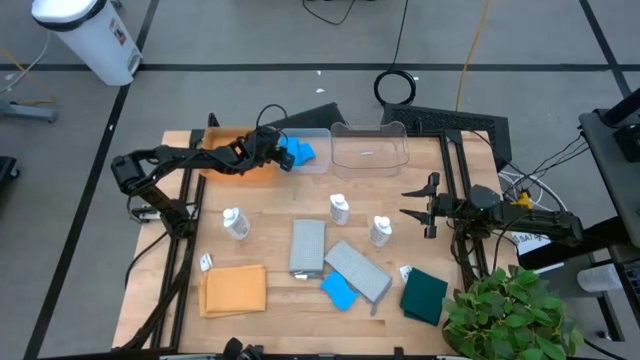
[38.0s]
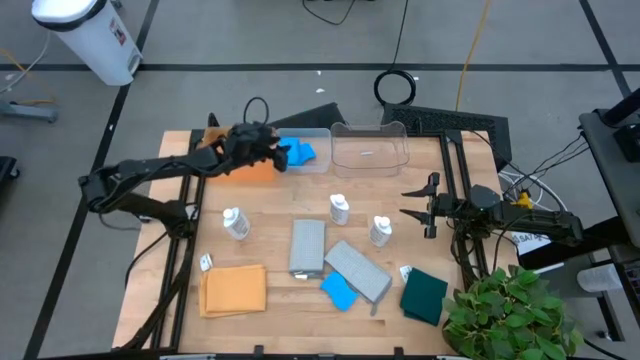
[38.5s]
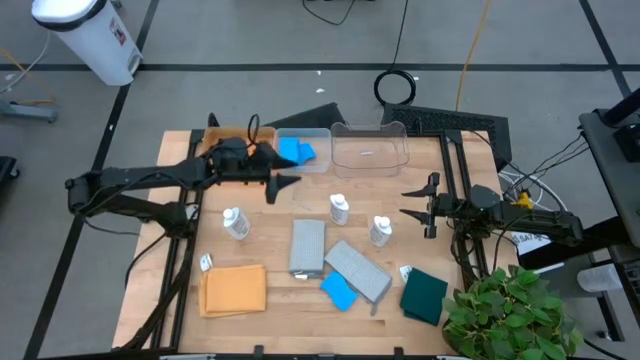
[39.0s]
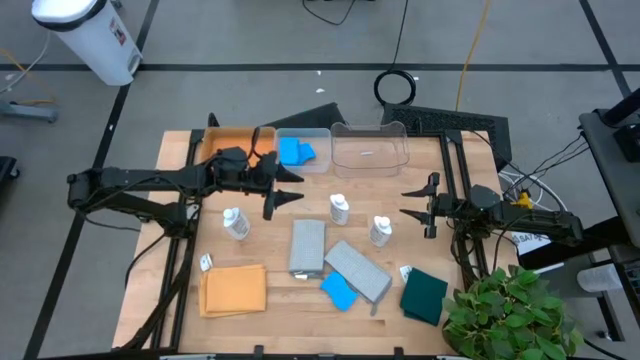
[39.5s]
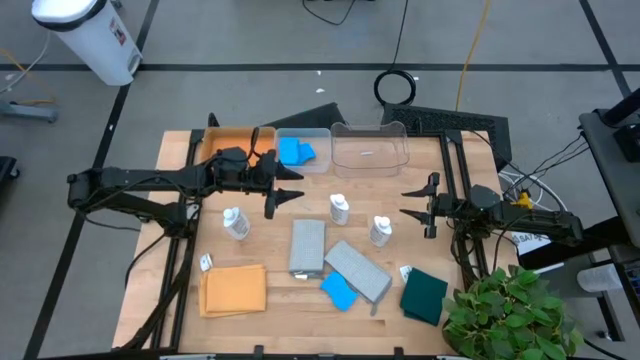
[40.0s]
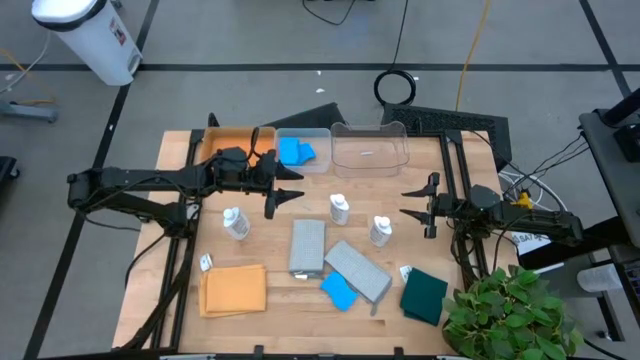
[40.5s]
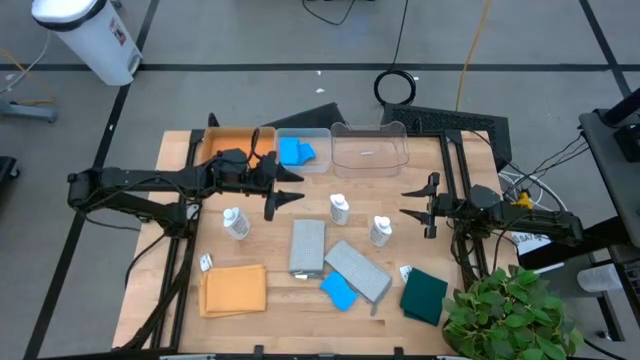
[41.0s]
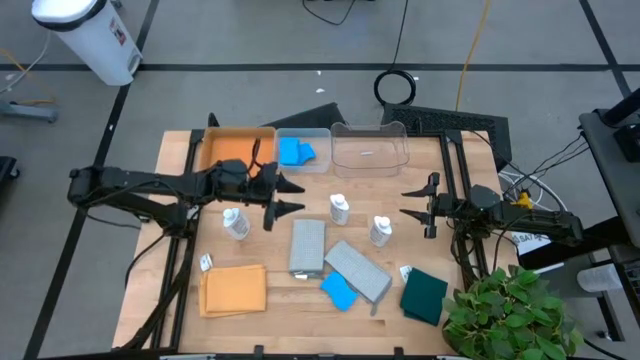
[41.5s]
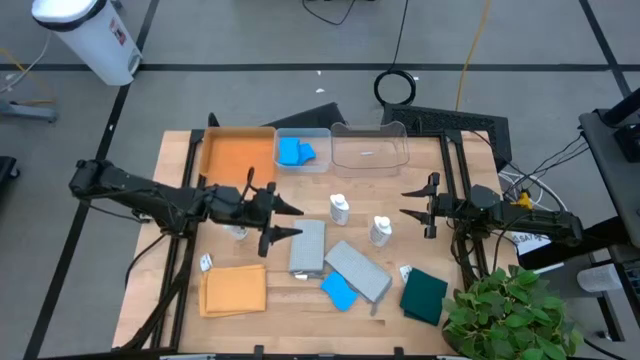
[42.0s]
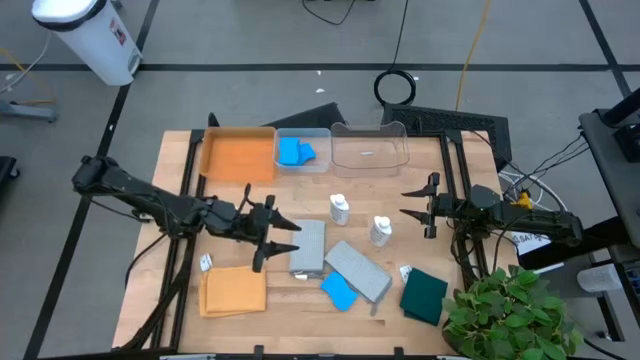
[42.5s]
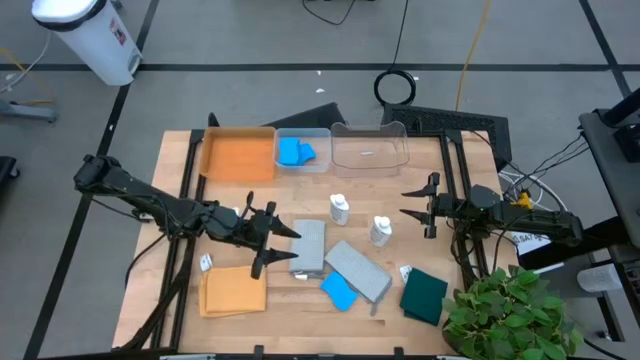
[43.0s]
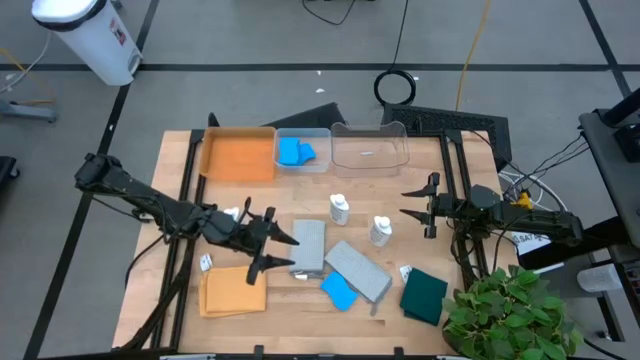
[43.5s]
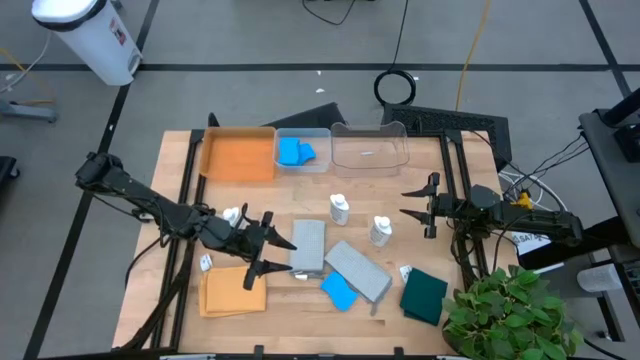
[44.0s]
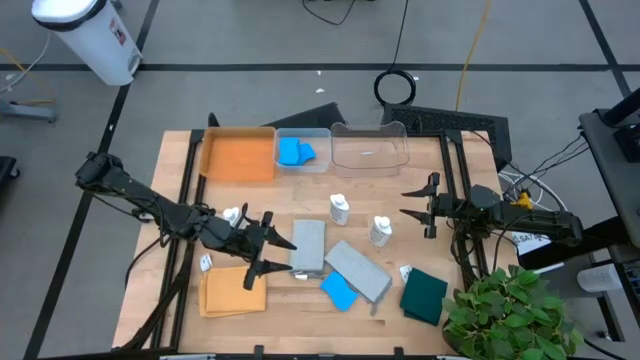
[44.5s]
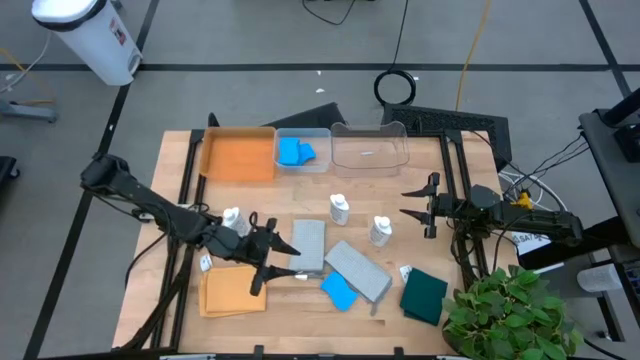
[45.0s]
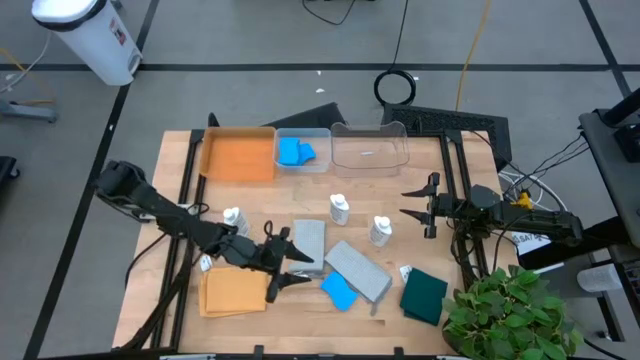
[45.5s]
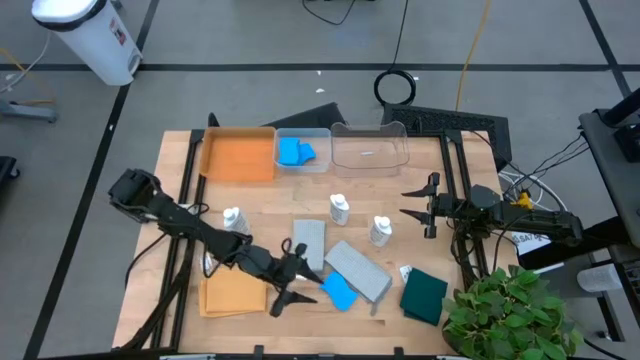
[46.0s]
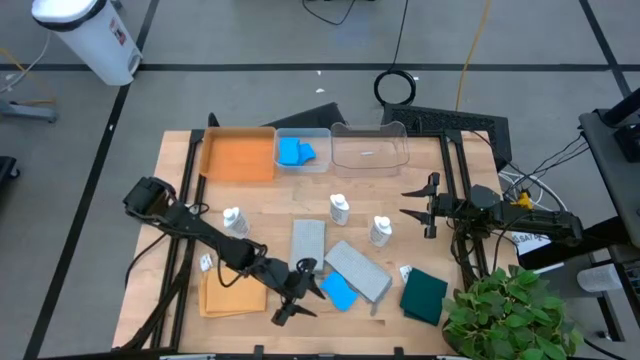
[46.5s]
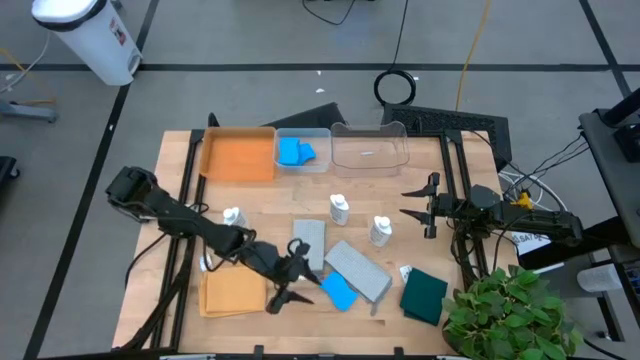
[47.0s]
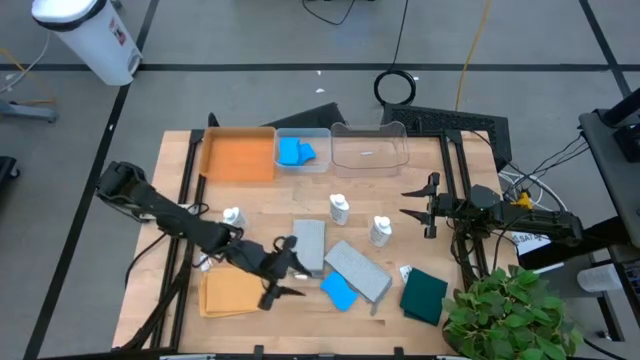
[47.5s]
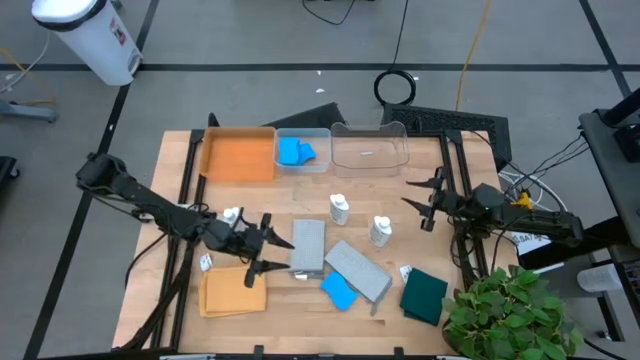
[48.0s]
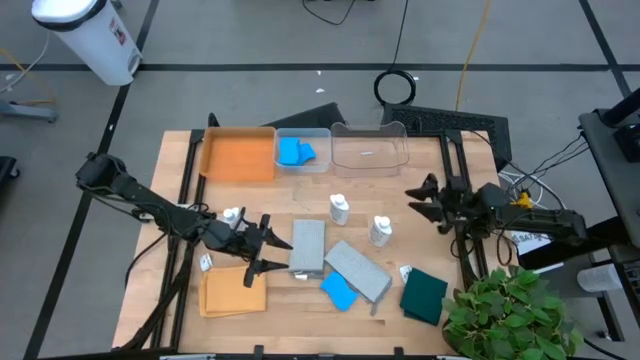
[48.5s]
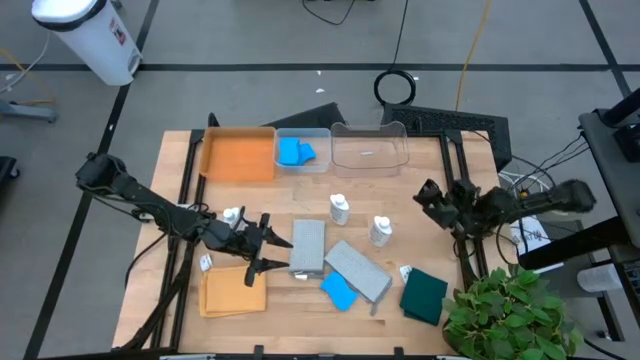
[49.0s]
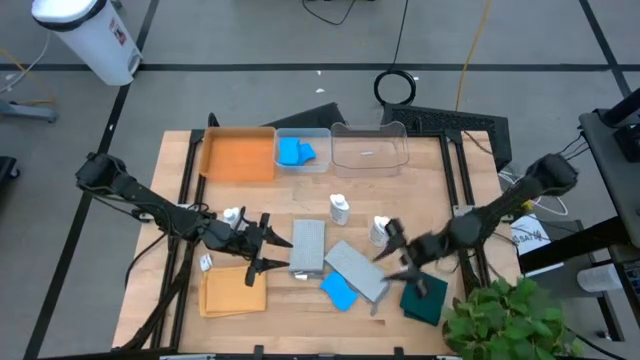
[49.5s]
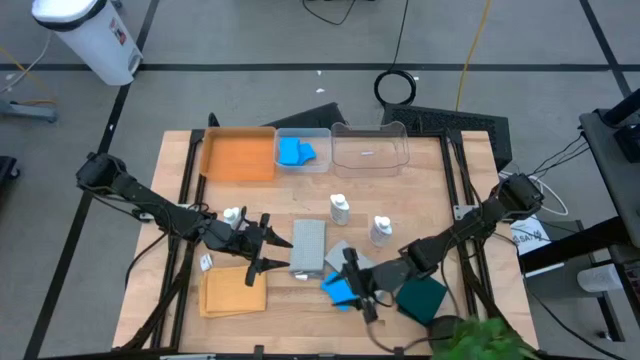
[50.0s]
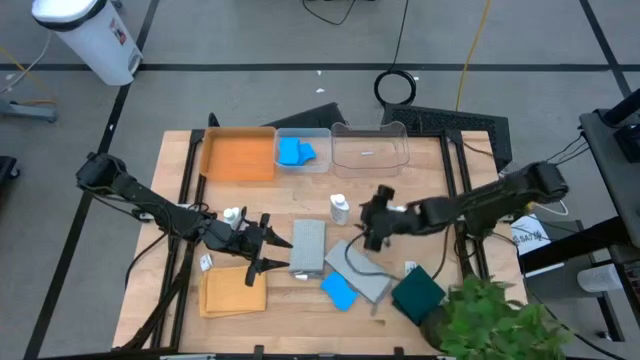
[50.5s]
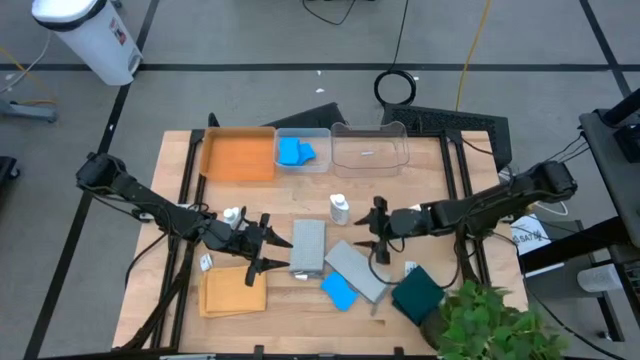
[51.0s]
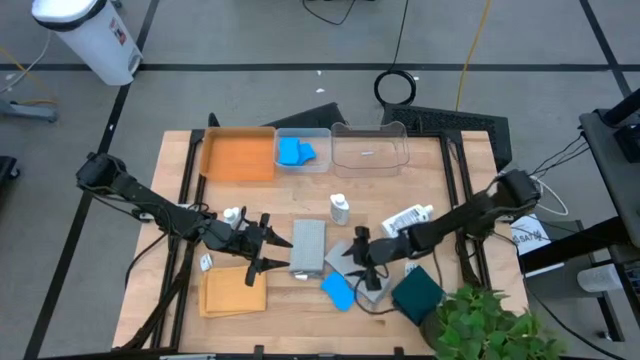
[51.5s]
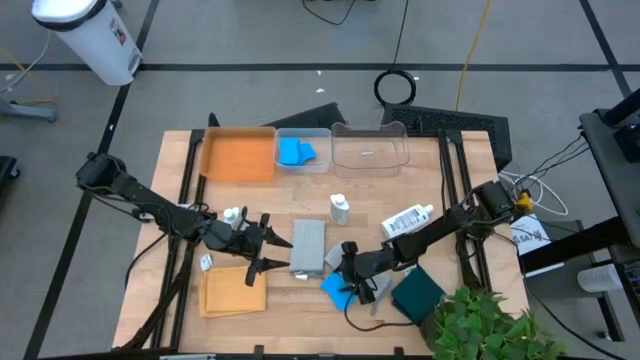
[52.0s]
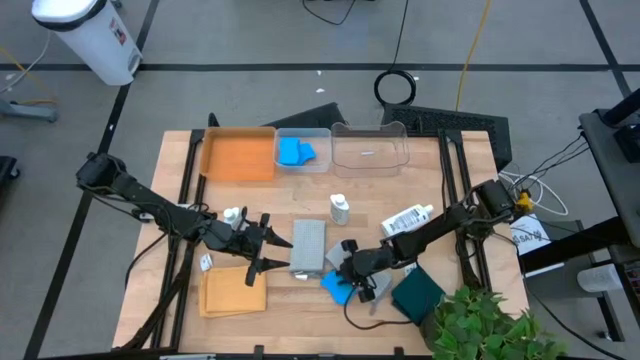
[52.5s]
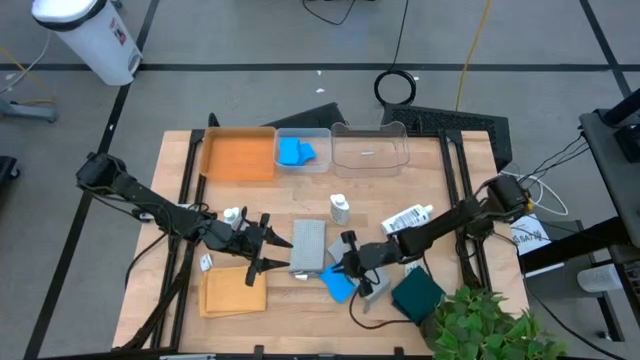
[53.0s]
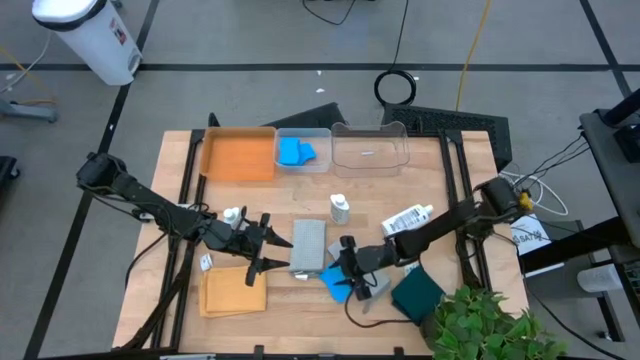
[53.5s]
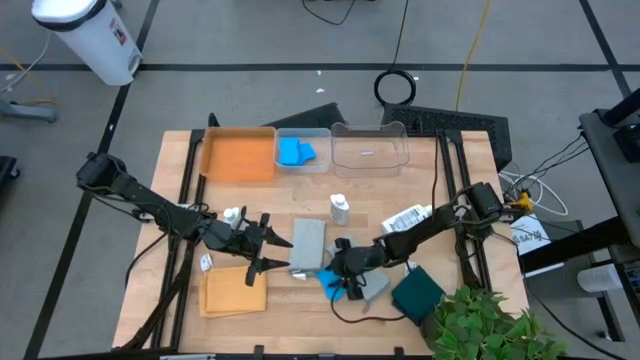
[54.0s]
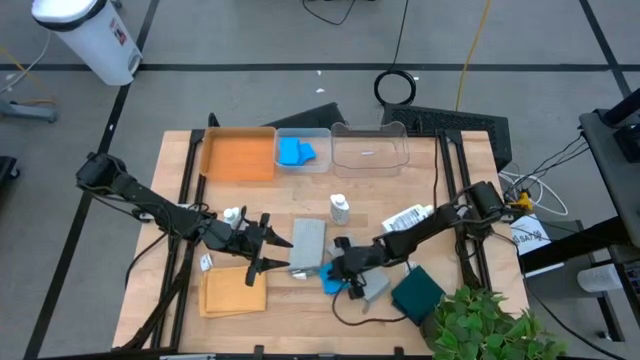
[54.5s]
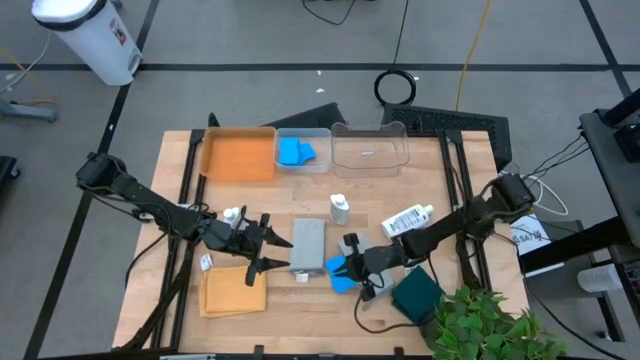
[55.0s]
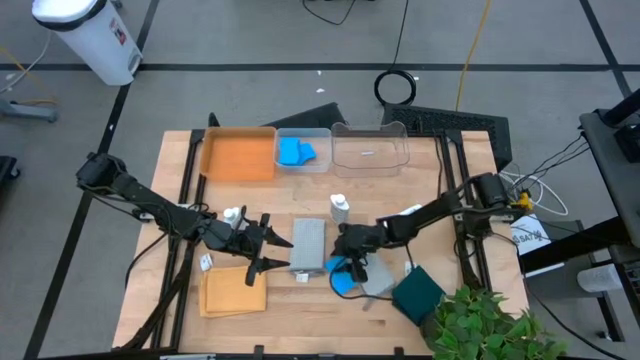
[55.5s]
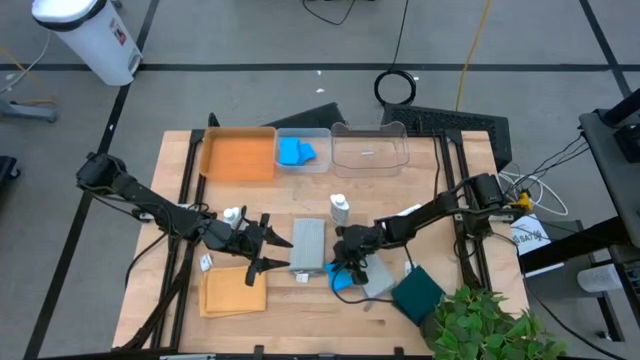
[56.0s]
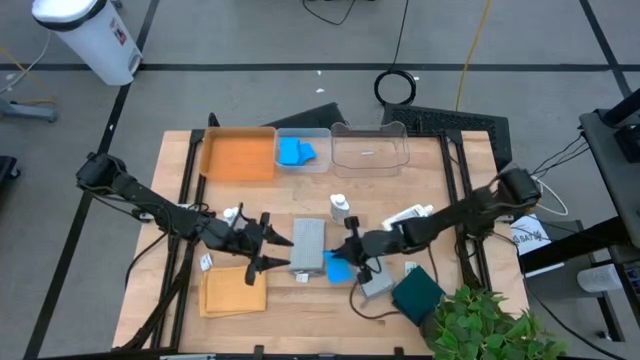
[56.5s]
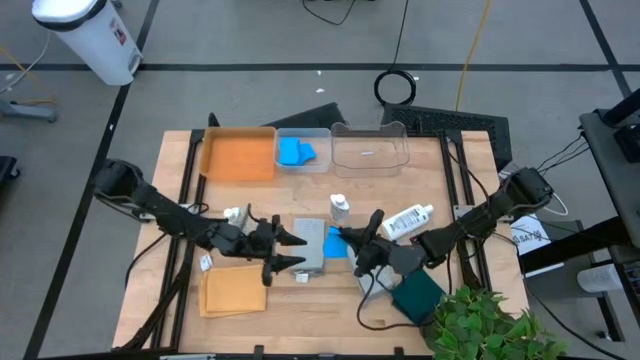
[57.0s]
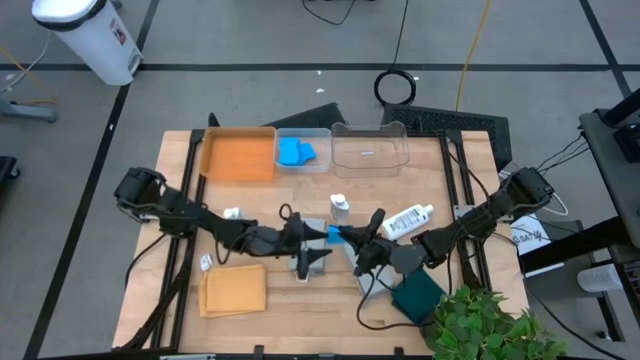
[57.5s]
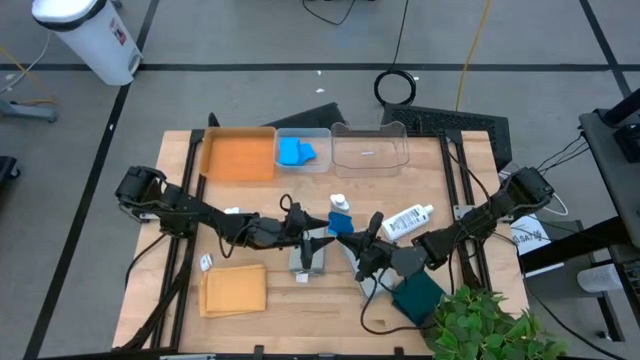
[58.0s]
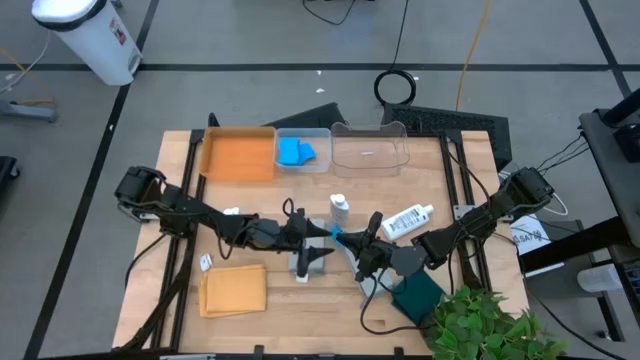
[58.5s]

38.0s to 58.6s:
Task: Pick & Place Kitchen Items
Put the blue sponge into the left transparent bin
